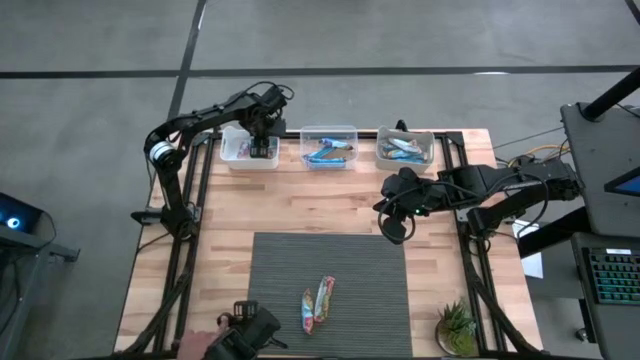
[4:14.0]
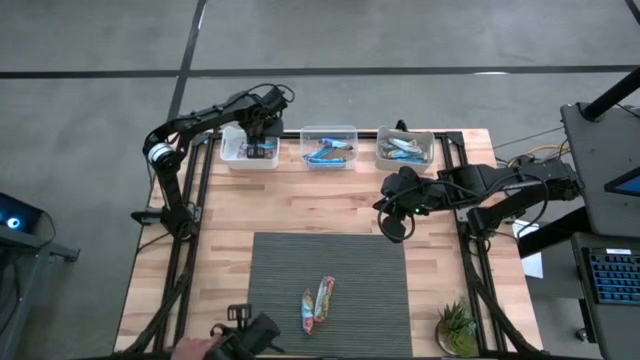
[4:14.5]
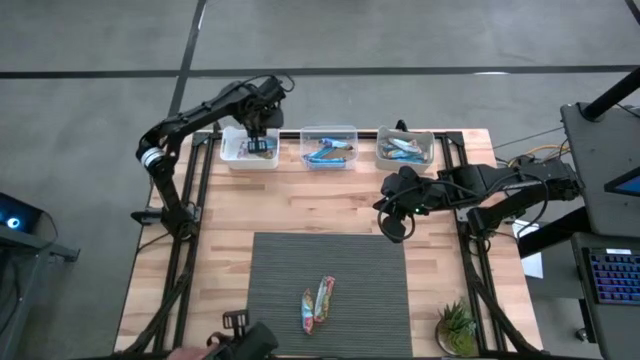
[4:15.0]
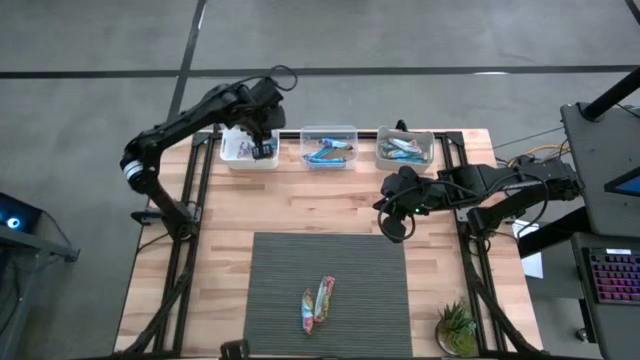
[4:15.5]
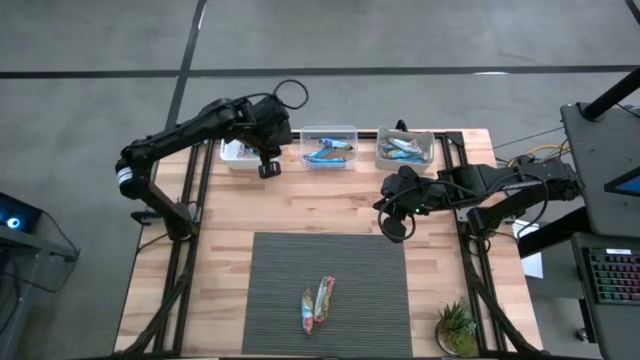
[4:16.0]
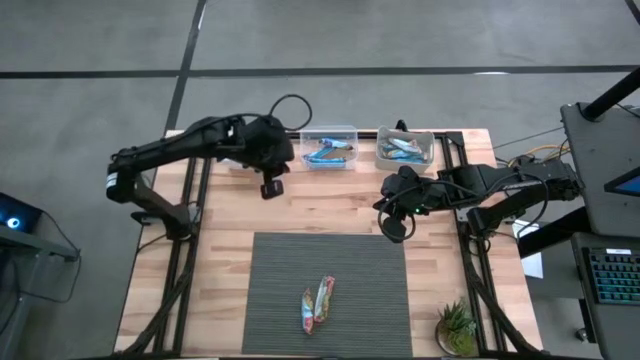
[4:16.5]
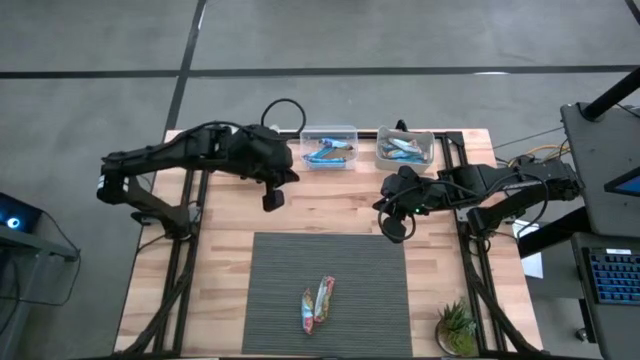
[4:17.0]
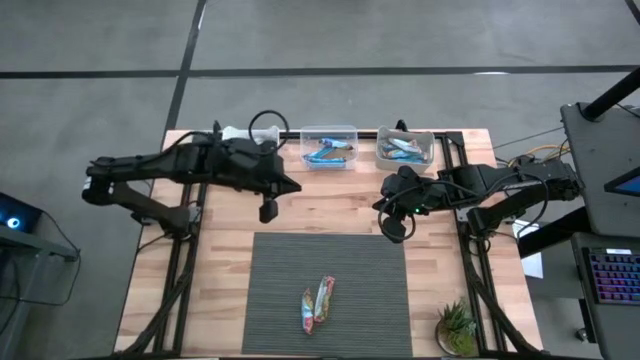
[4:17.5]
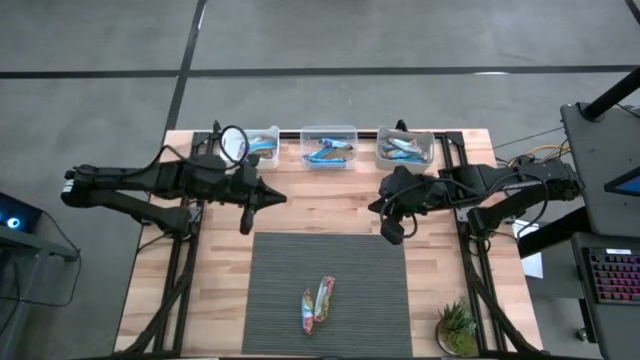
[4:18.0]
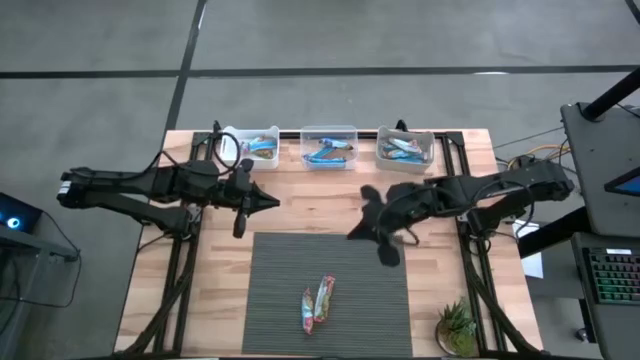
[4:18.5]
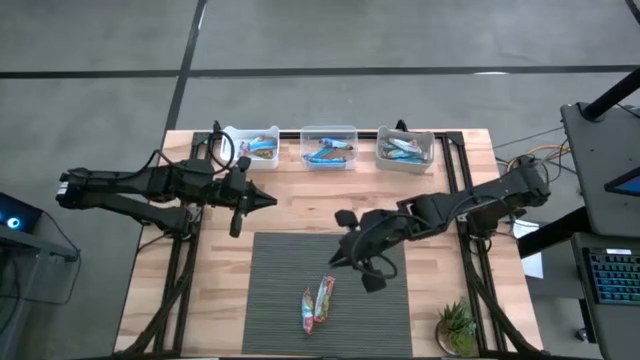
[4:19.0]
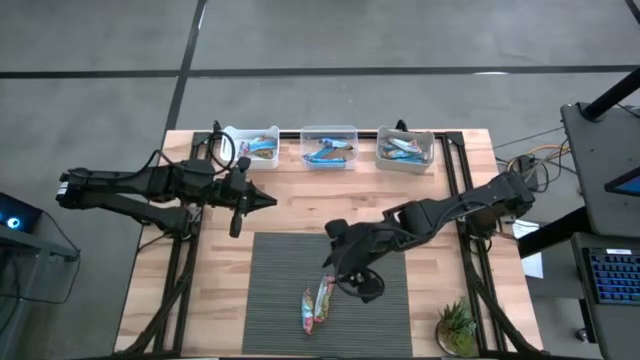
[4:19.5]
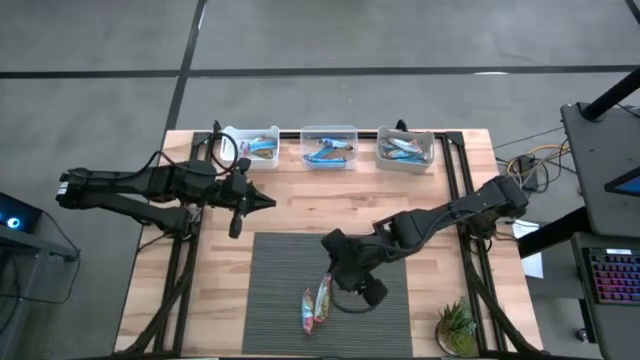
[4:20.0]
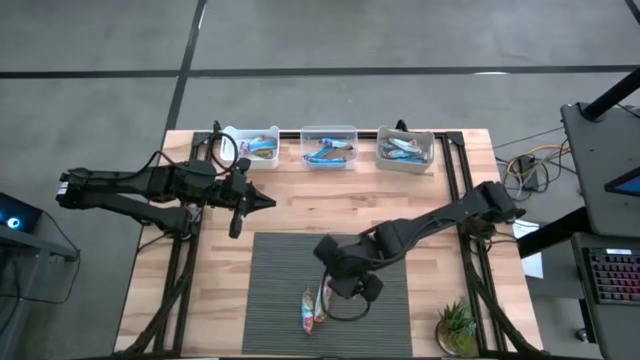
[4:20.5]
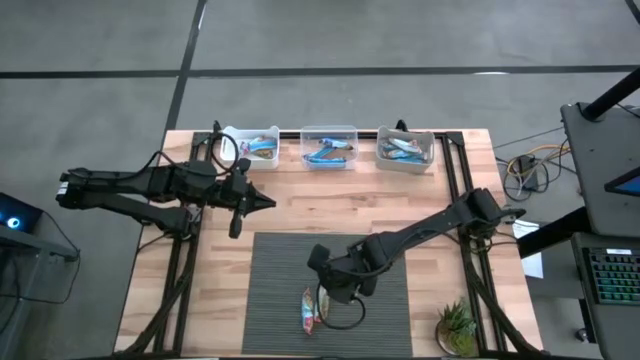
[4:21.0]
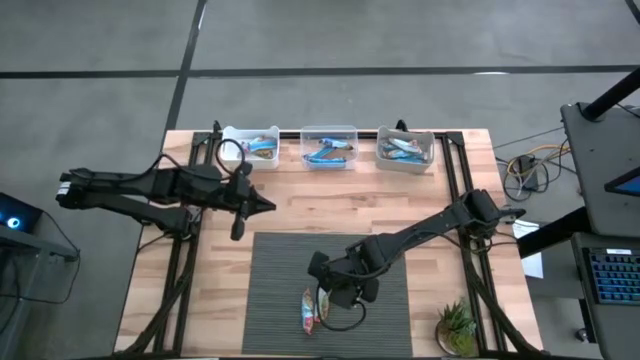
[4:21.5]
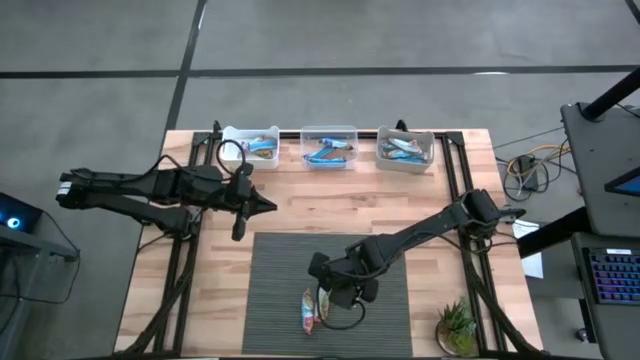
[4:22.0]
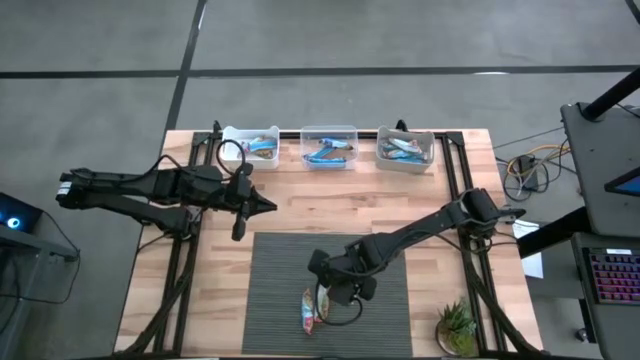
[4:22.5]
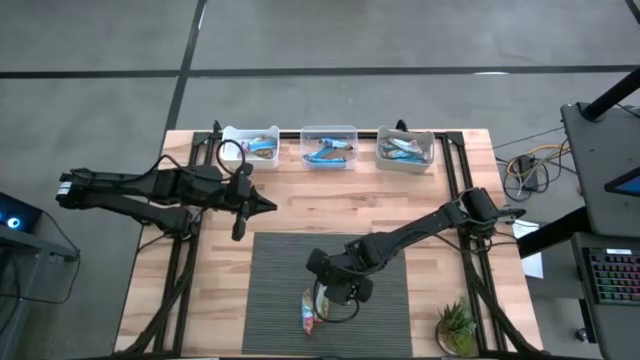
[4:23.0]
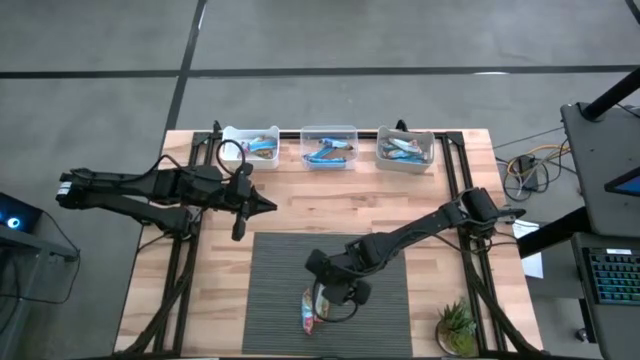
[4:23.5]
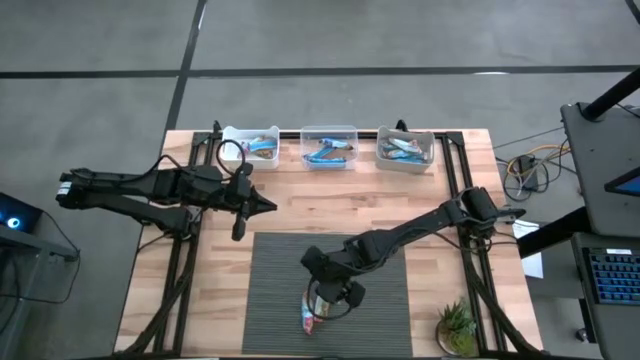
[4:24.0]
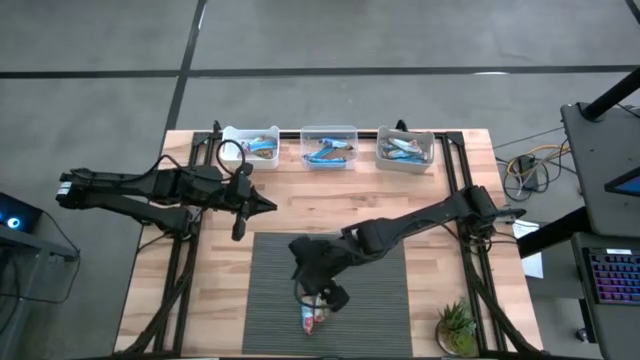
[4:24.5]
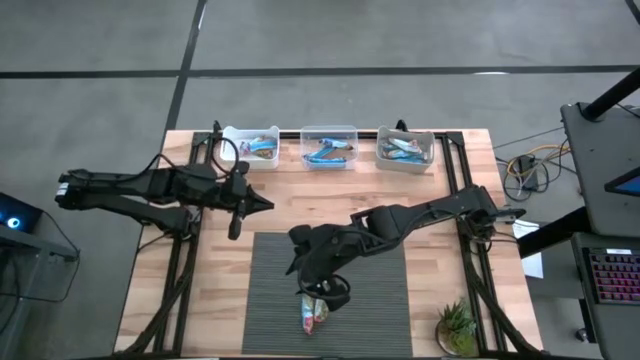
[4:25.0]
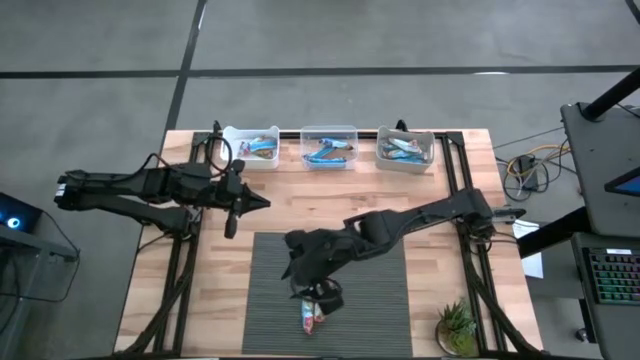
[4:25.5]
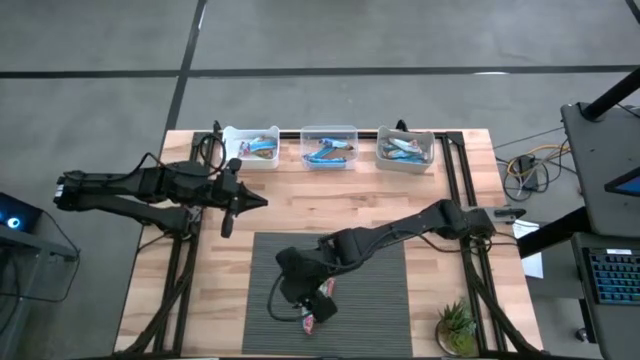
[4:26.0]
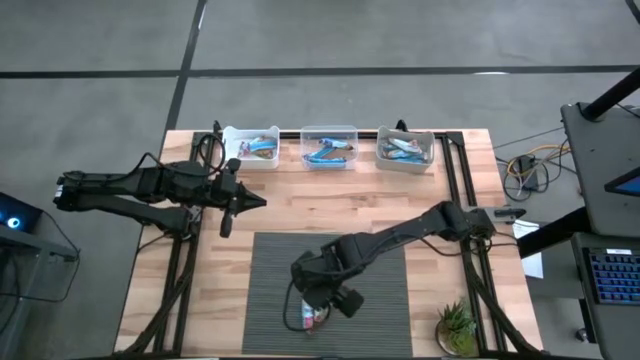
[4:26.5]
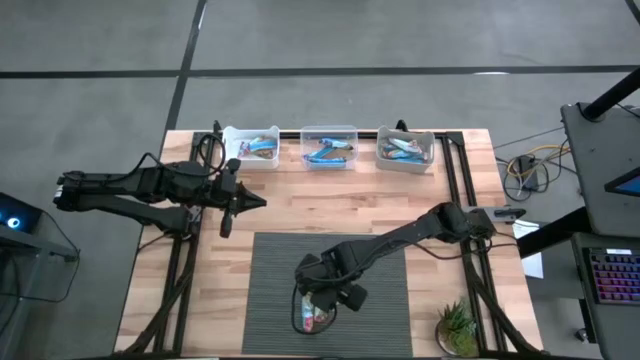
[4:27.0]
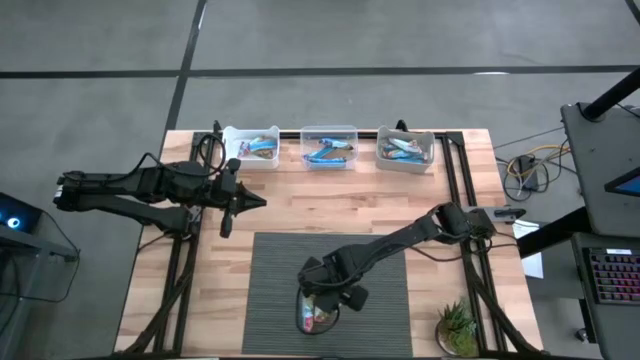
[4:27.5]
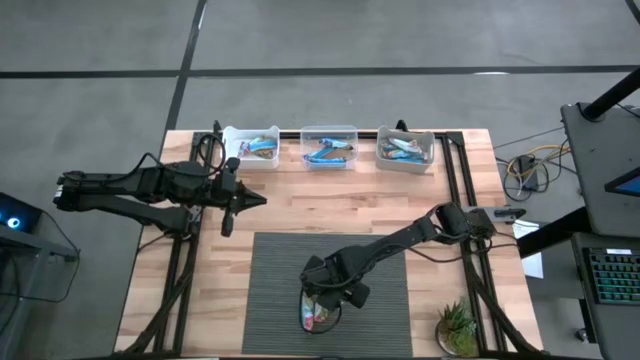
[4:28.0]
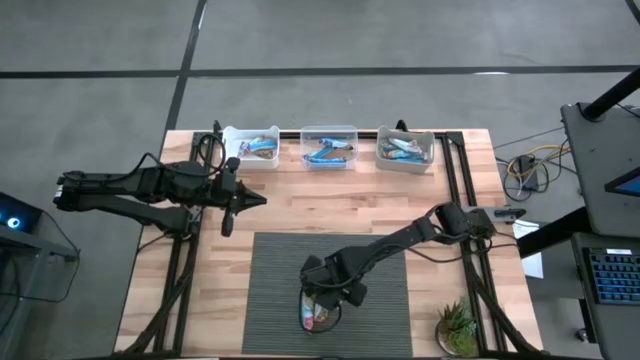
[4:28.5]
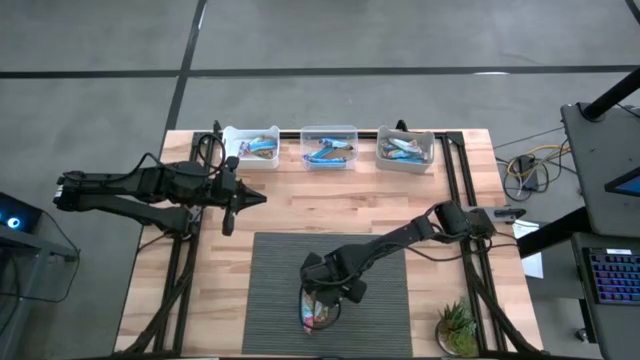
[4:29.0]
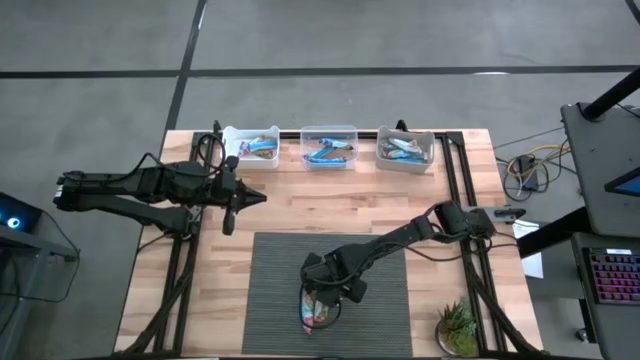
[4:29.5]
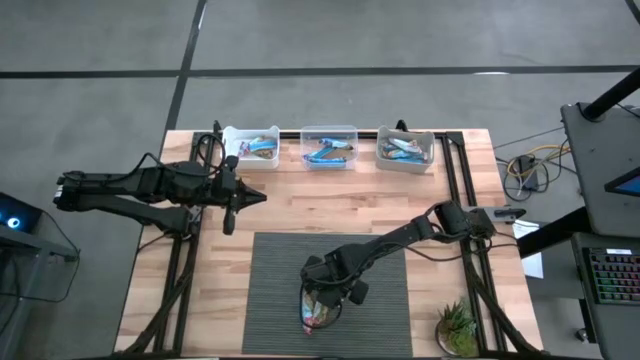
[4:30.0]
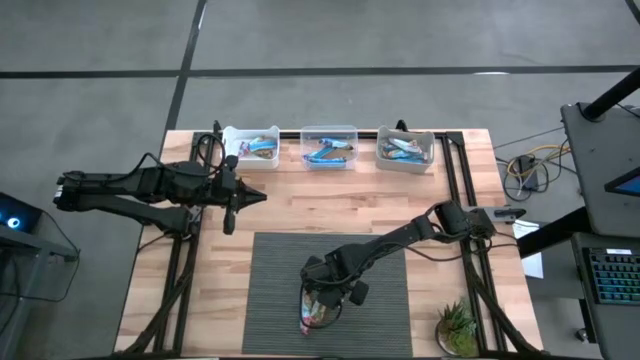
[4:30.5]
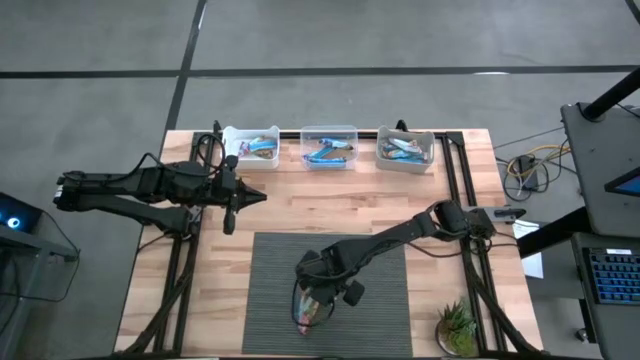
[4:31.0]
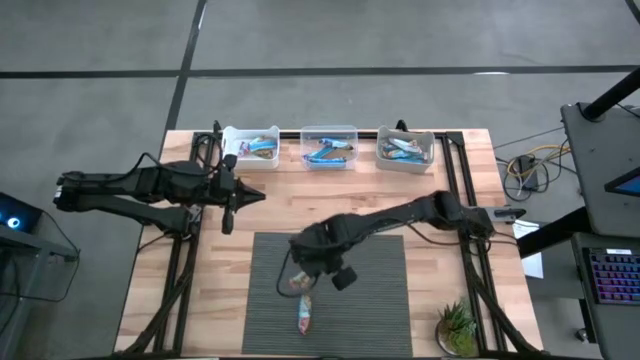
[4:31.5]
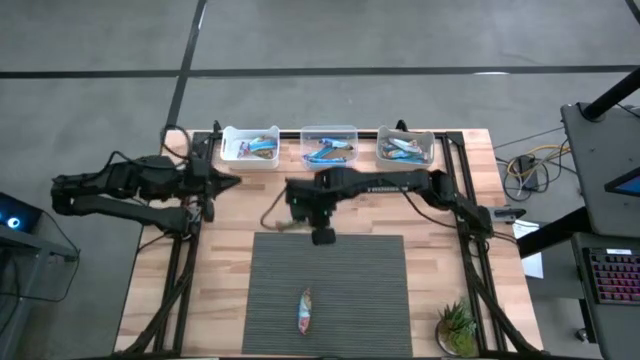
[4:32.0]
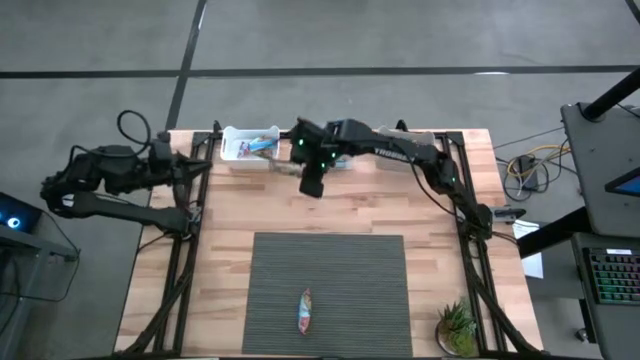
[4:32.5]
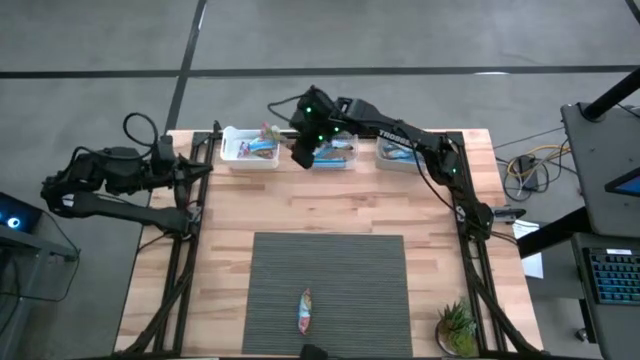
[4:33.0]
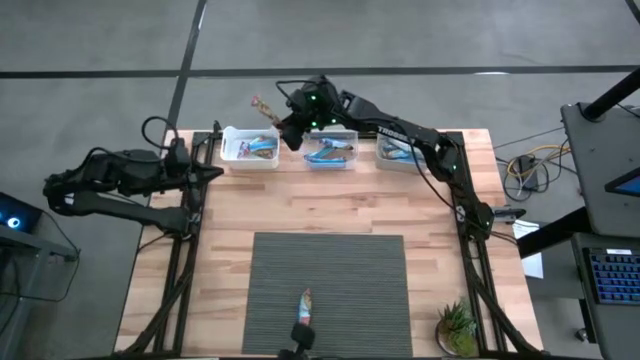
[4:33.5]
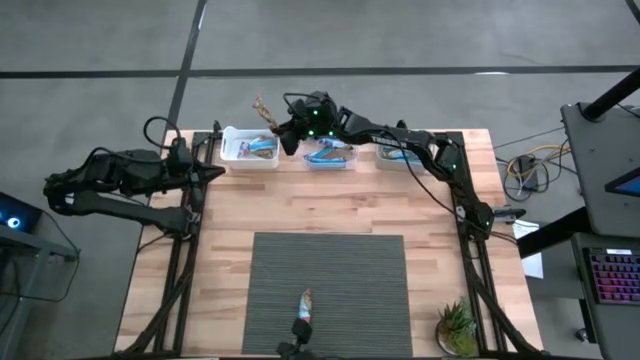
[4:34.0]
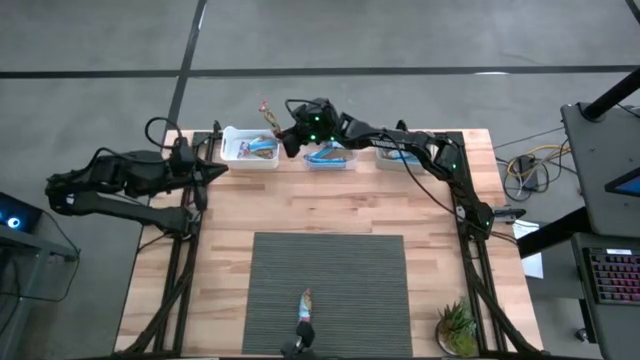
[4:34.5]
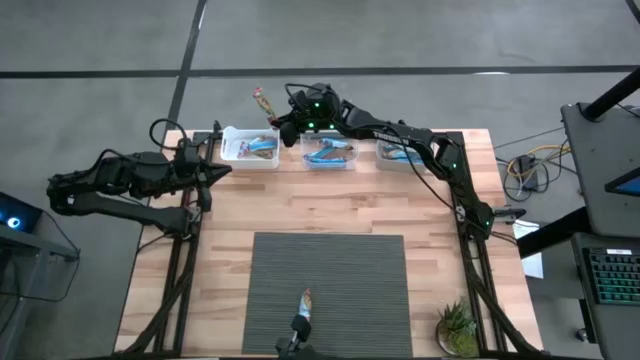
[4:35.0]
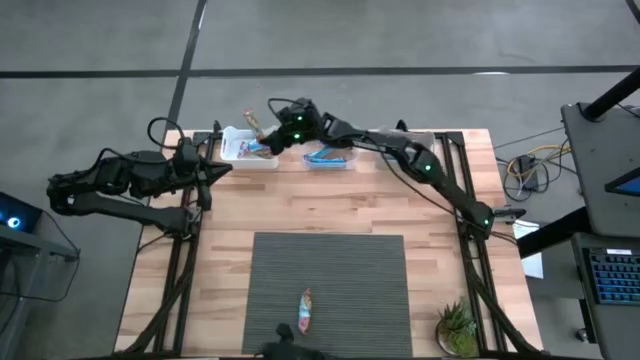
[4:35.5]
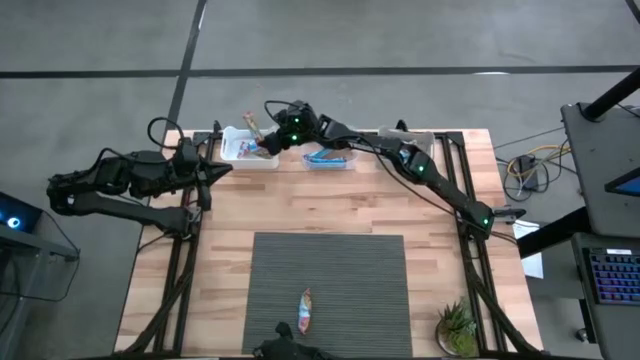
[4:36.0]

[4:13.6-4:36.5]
Task: Pick and place Granola Bars by type
Put the right red granola bar into the white bin
